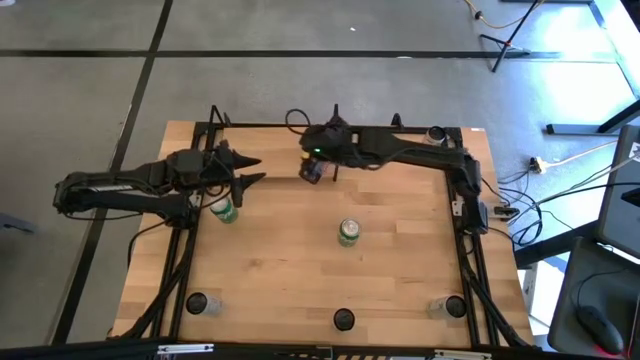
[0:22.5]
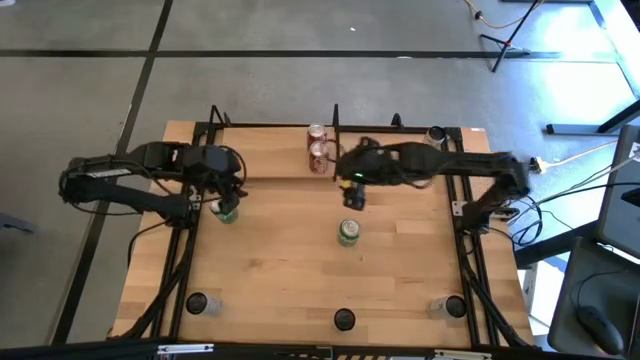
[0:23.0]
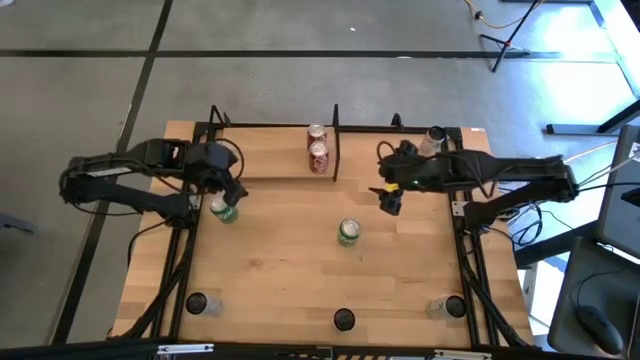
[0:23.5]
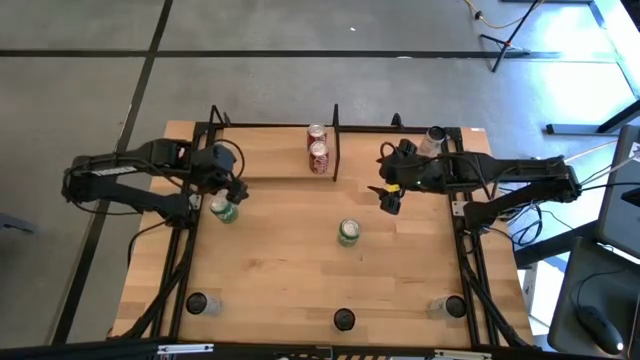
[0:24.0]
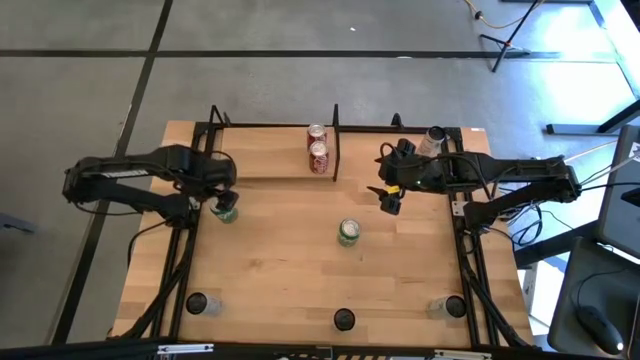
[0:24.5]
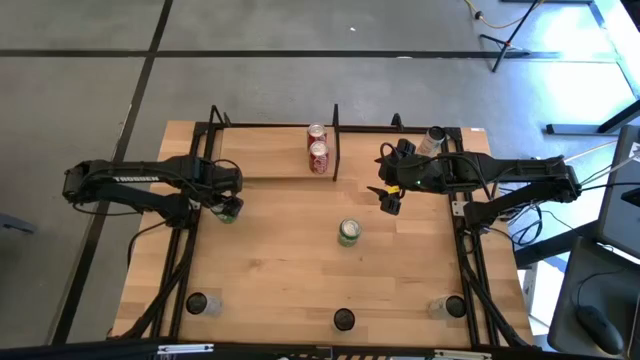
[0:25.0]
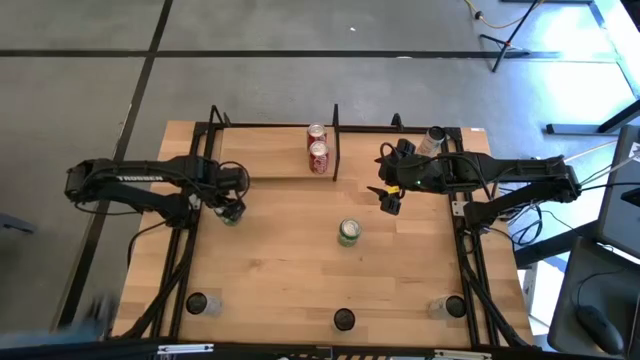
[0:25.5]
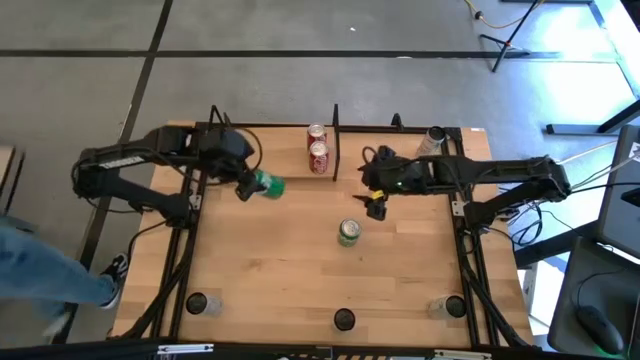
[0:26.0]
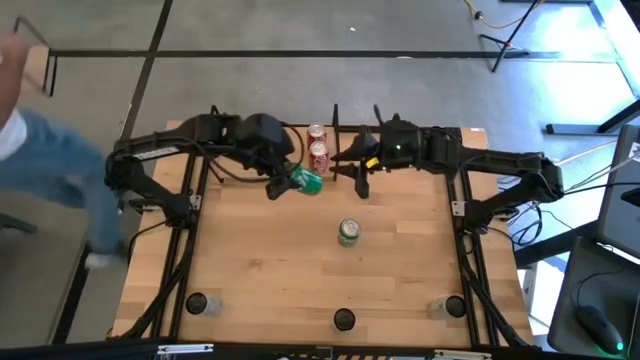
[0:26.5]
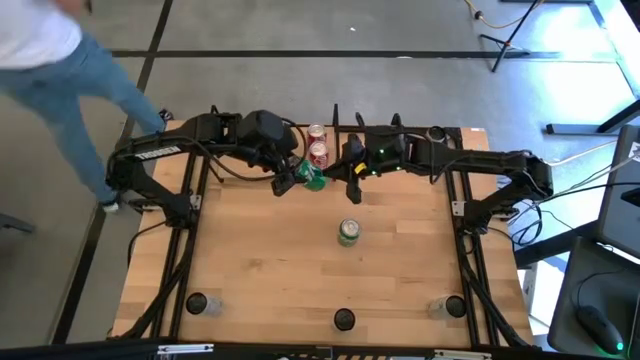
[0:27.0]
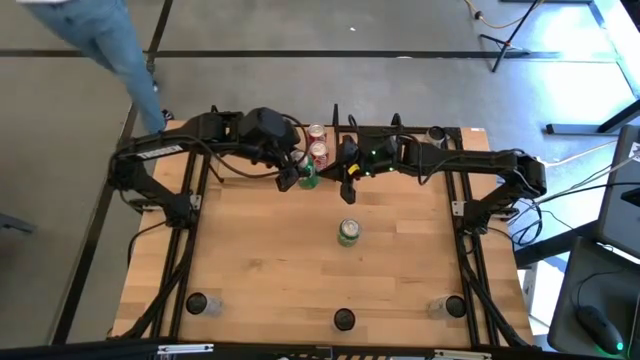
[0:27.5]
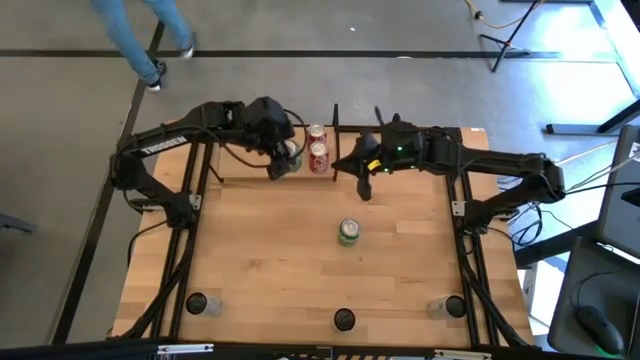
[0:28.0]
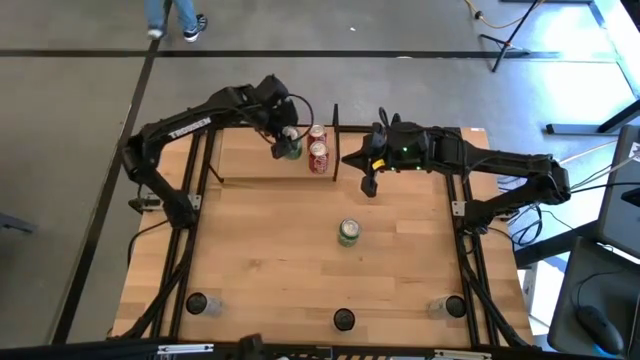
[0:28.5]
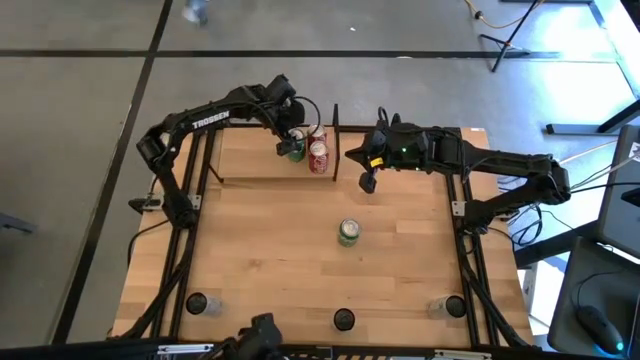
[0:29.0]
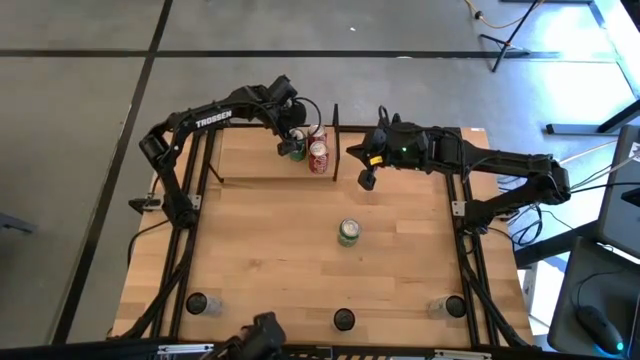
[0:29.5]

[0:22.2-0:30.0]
Task: Place canned beverage on shelf
Put the left green soda can on the shelf

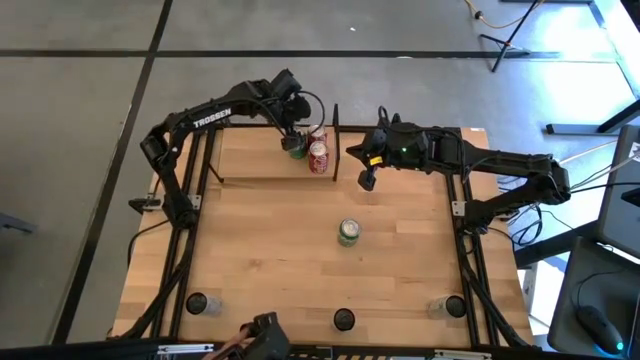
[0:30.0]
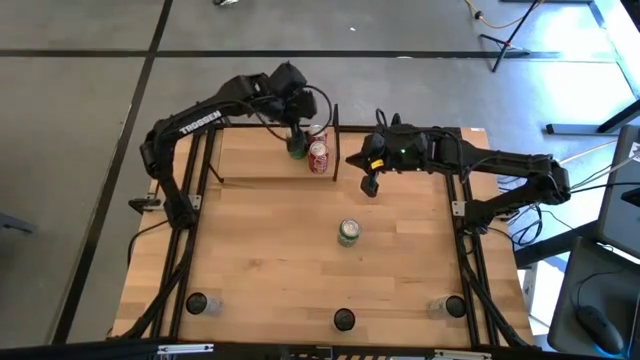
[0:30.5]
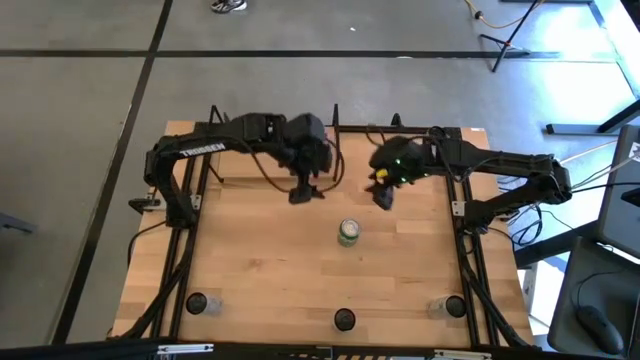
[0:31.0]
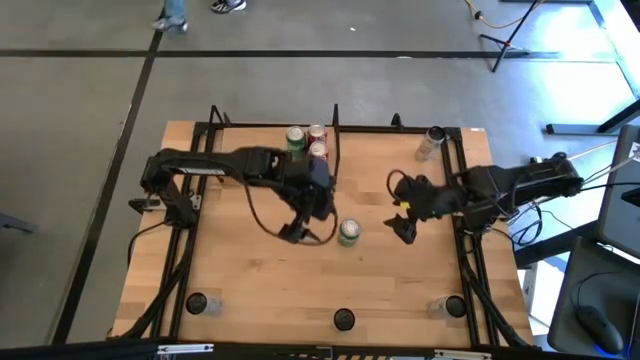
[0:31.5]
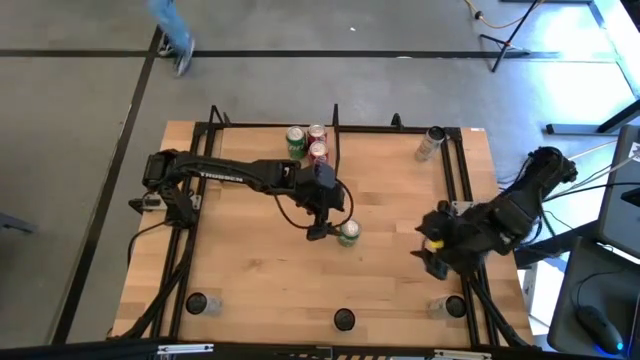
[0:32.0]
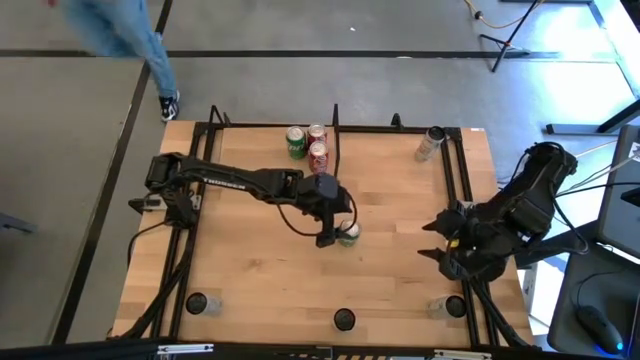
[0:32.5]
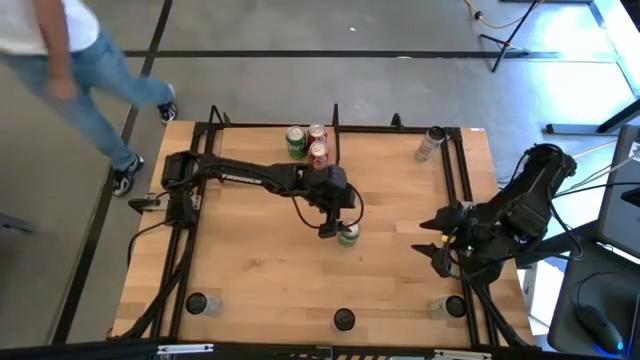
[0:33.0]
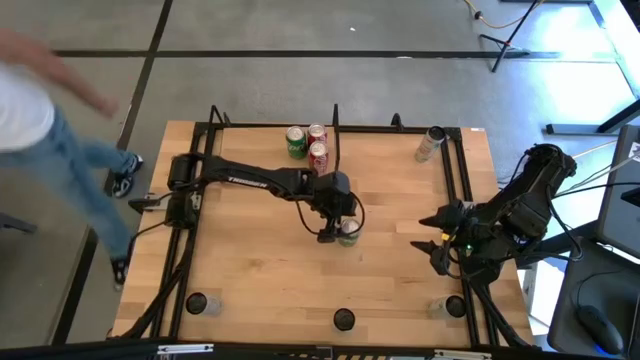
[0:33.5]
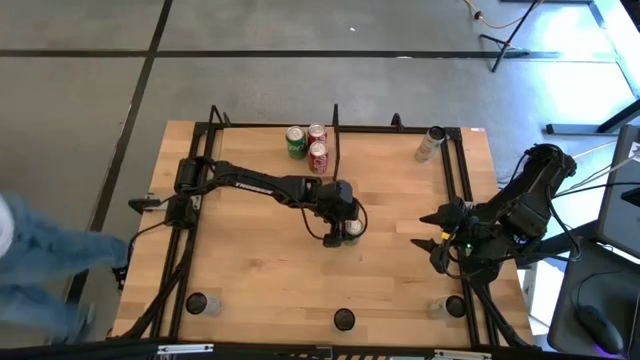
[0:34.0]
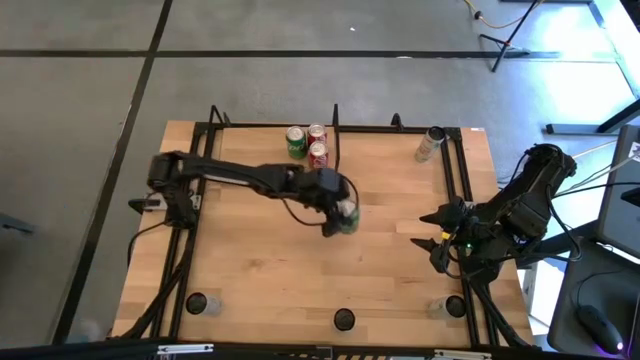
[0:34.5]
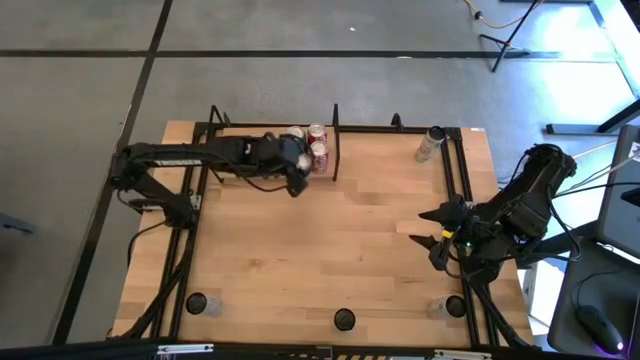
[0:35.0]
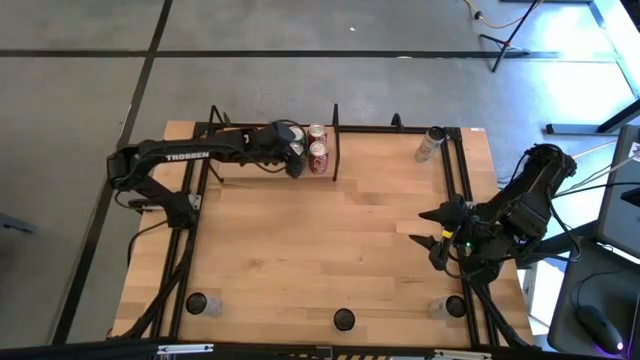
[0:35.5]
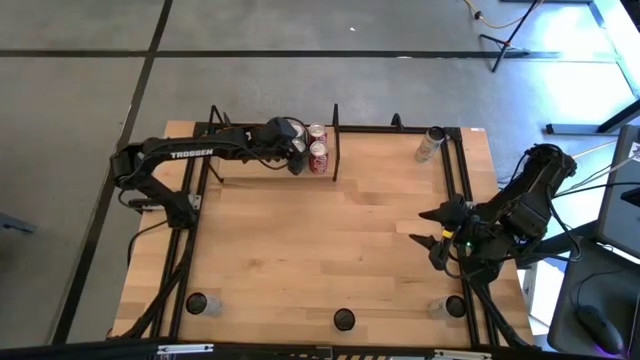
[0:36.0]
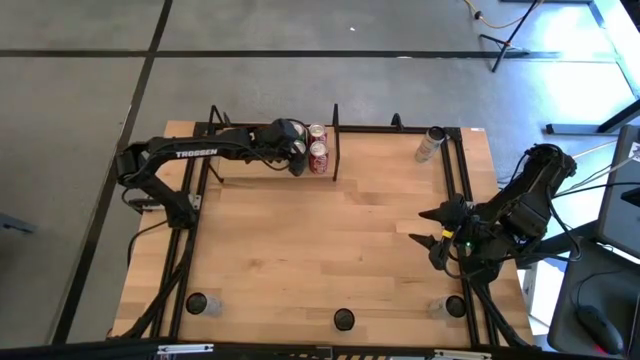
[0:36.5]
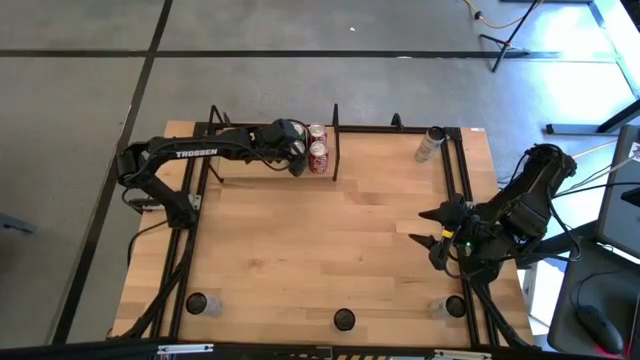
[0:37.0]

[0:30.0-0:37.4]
Put the green soda can on the shelf aligned with the other green soda can

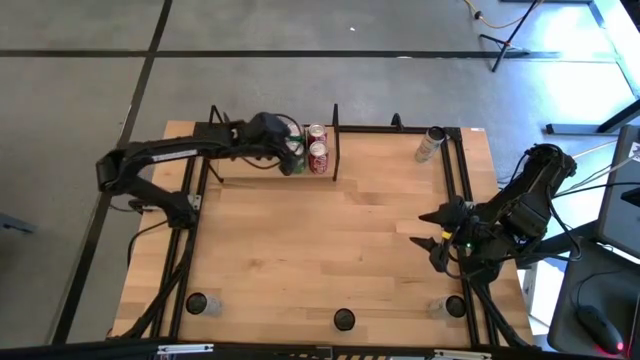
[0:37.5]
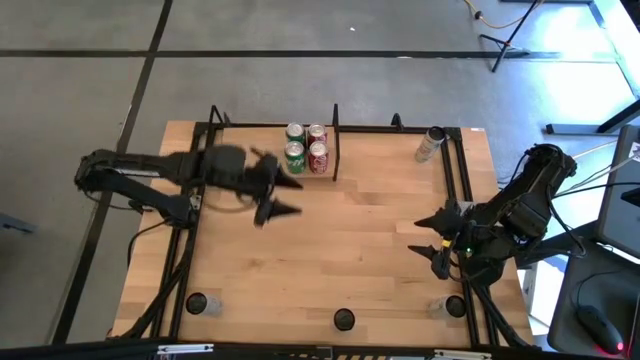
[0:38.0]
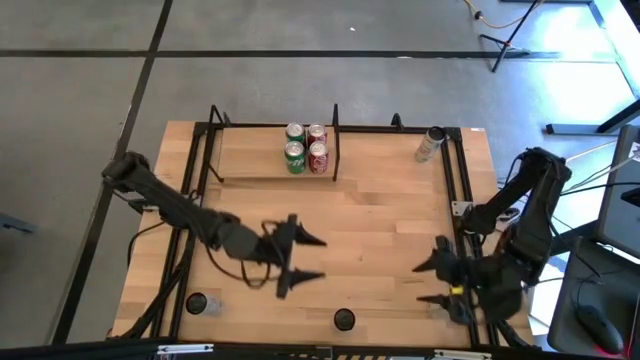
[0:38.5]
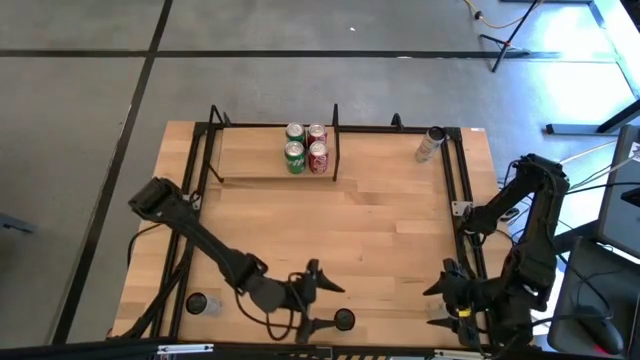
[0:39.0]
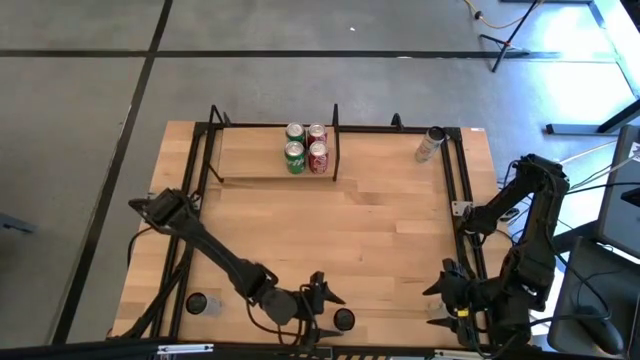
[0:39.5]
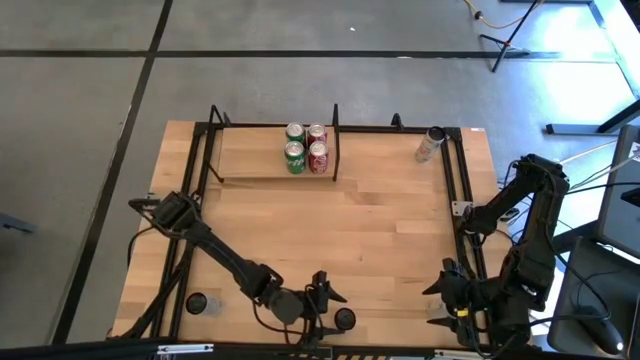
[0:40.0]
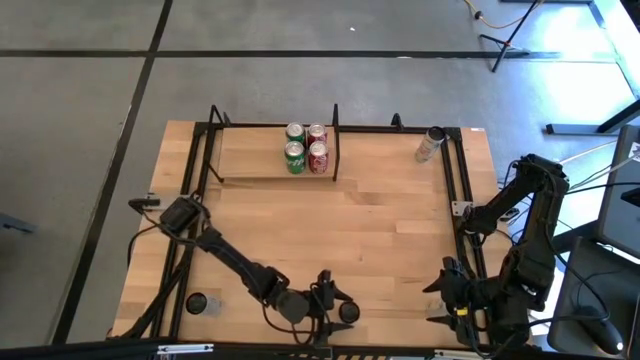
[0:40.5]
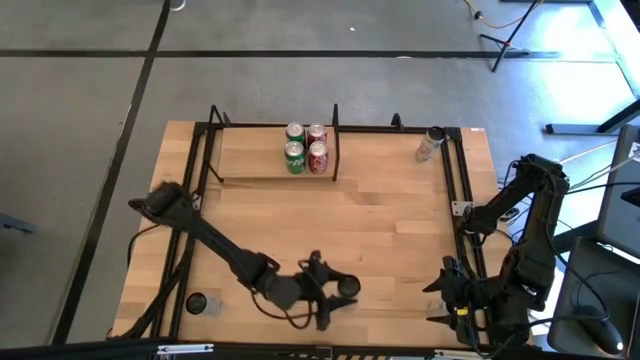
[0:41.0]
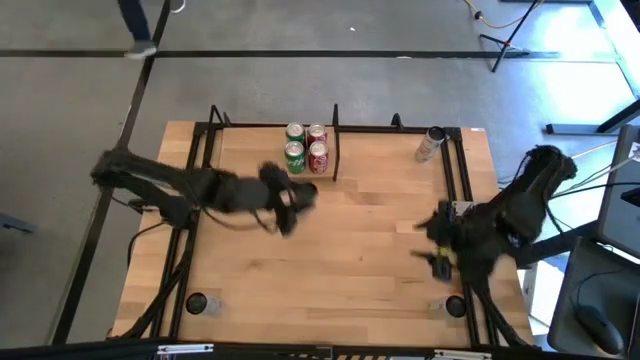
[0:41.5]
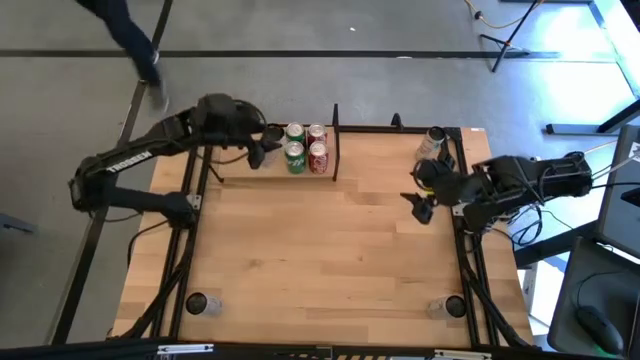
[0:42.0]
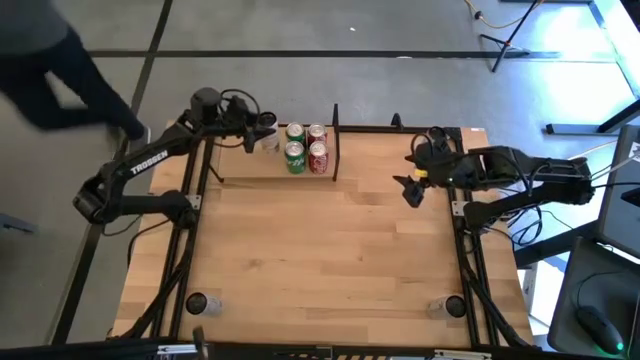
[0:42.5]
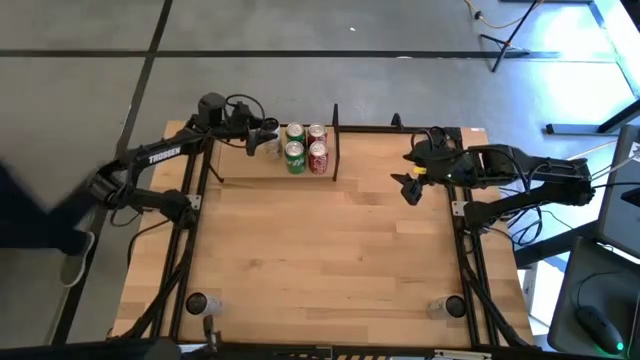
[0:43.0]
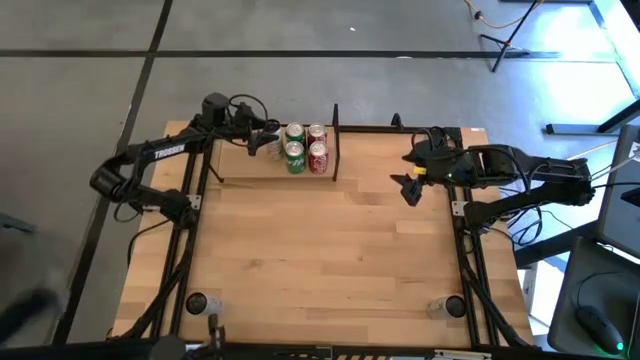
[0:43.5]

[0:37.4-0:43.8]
Put the right white-yellow soda can on the shelf
